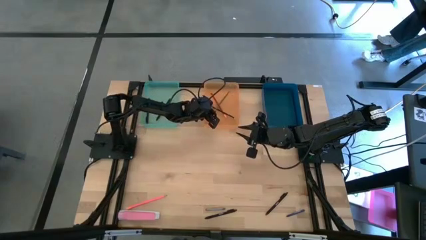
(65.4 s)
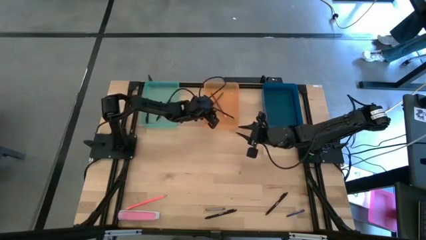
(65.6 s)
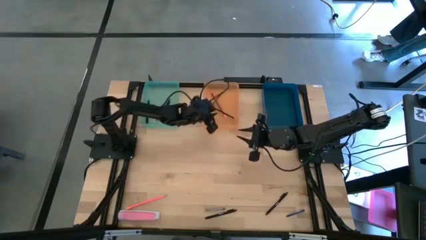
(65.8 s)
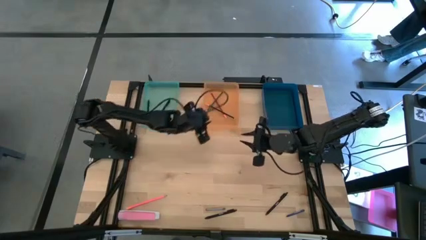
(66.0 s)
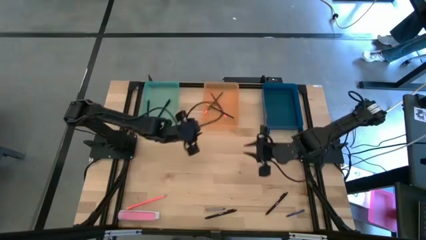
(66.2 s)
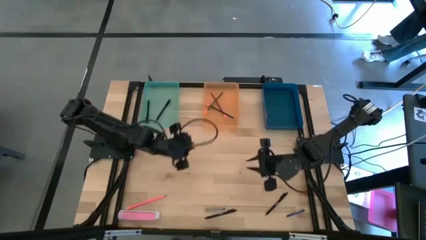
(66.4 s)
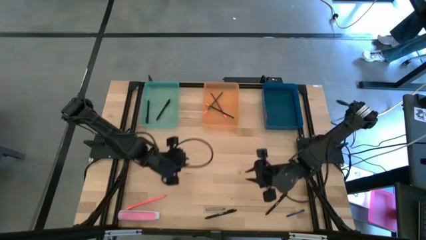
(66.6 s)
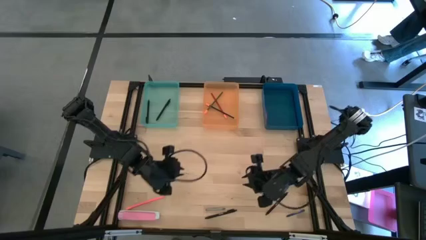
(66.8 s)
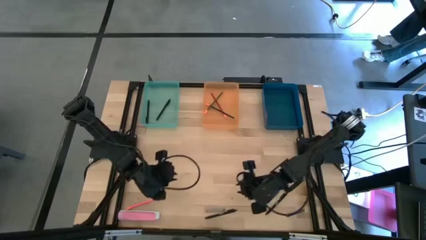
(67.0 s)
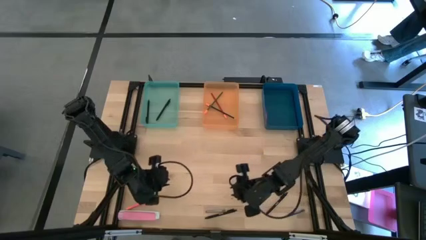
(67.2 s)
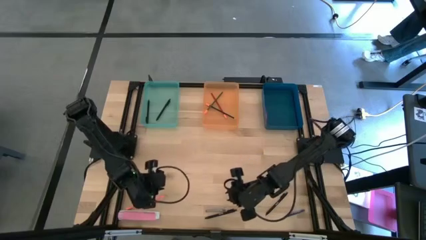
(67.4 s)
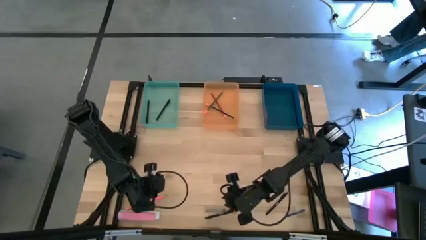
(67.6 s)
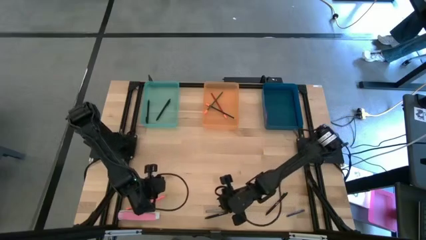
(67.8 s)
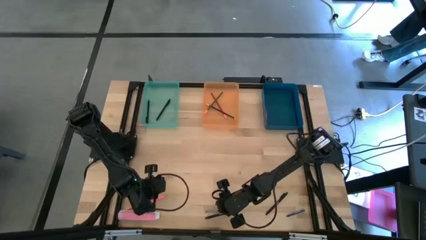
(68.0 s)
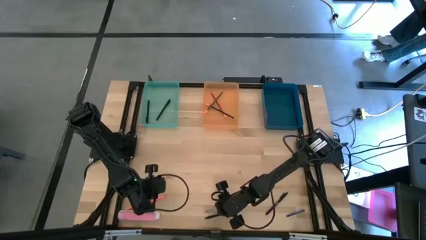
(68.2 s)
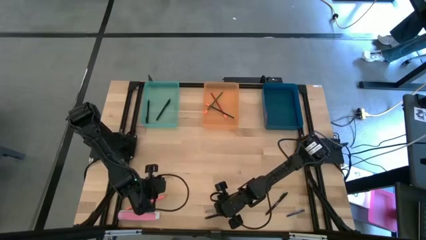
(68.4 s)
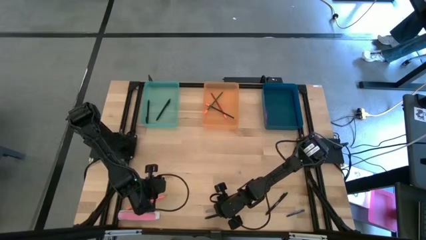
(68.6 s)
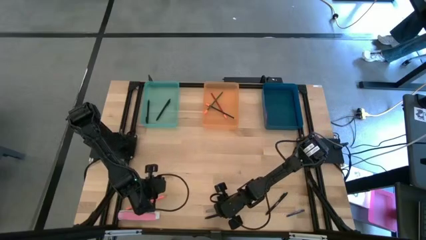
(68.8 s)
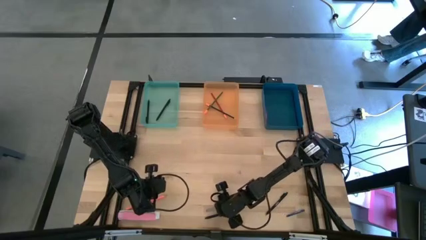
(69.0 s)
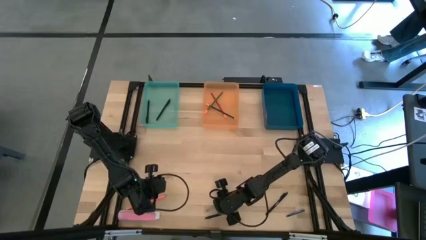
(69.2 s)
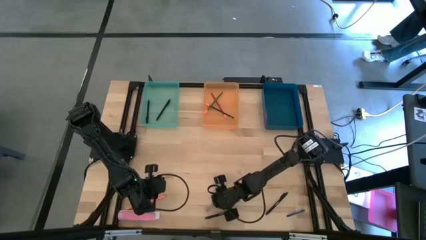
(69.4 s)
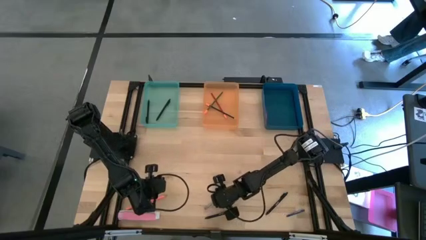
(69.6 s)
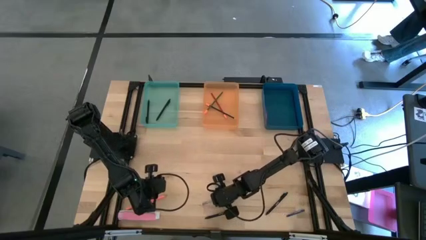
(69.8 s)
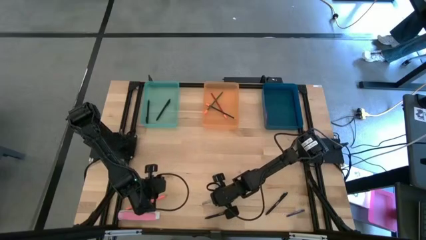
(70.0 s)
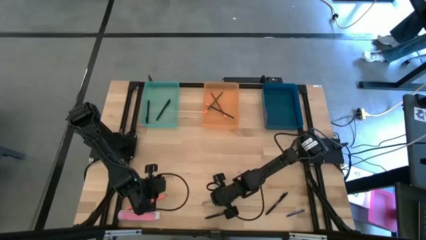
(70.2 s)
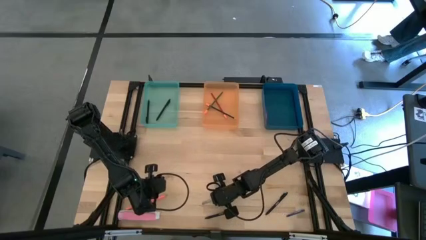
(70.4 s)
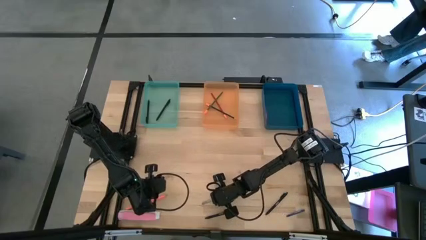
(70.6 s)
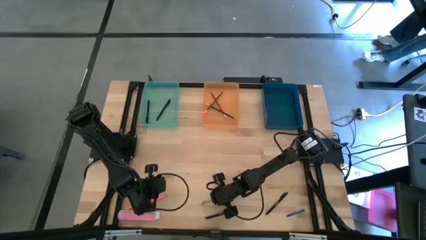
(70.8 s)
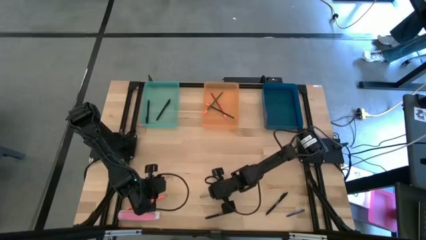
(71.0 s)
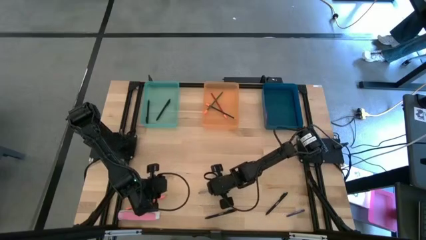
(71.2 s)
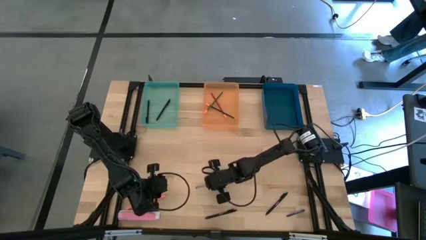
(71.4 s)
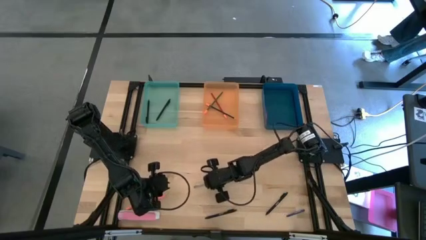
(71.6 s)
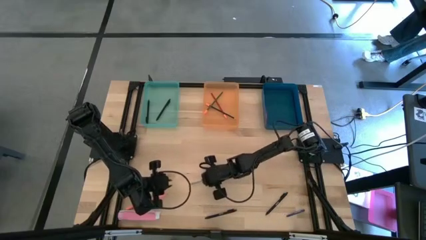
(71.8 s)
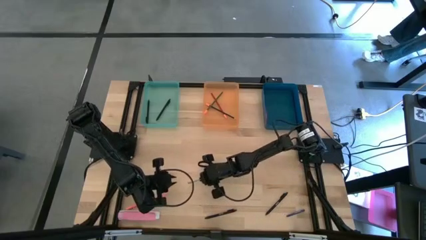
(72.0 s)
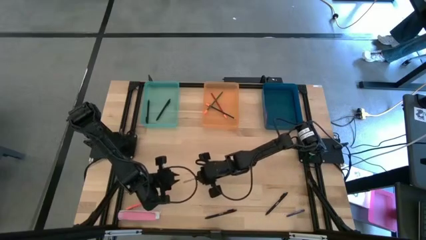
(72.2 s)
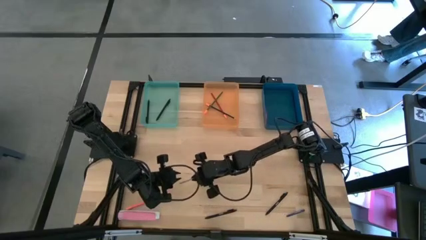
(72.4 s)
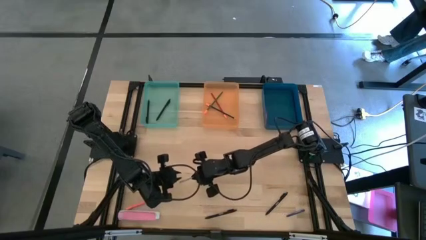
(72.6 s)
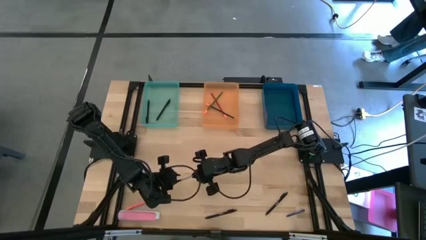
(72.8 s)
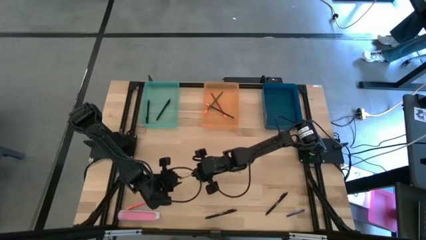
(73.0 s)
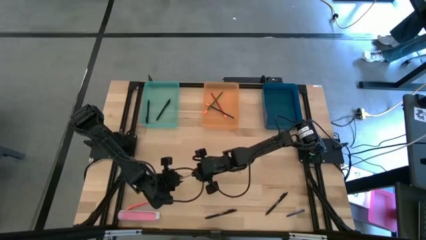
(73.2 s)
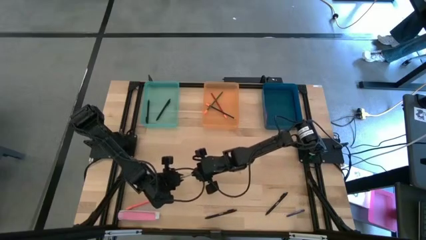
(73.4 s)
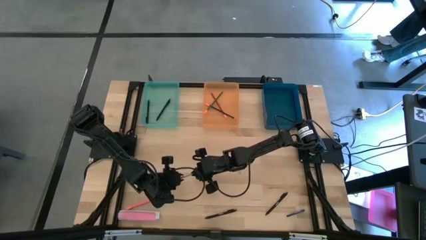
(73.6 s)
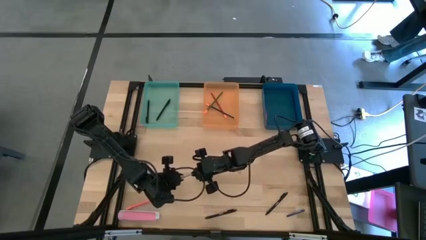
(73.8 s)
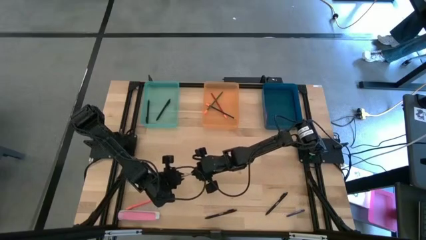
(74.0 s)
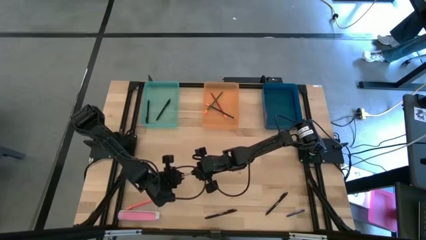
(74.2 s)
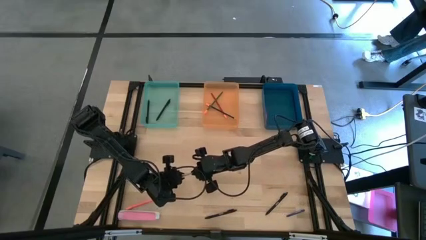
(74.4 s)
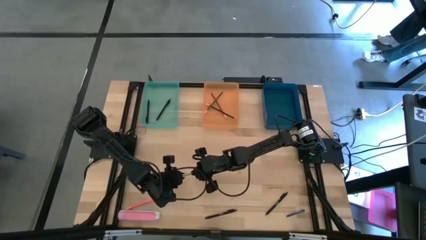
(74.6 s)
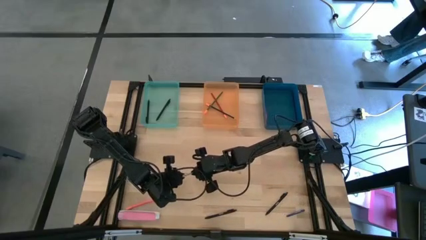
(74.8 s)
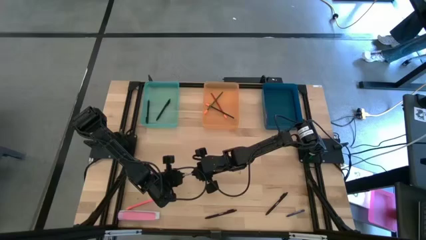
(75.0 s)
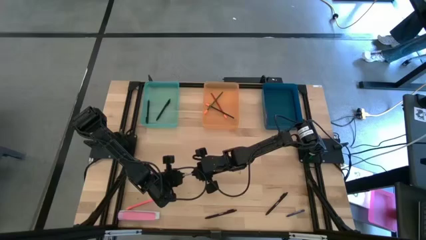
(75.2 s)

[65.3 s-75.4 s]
Task: Sort crayons/erasers/pens/pencils in bins
Put the gray crayon into the blue bin

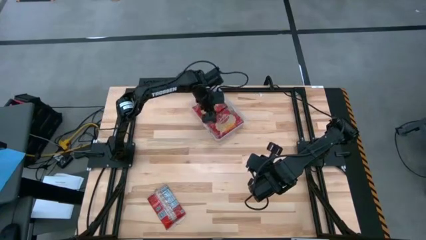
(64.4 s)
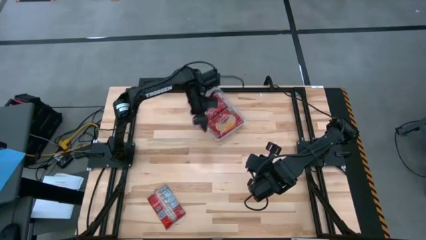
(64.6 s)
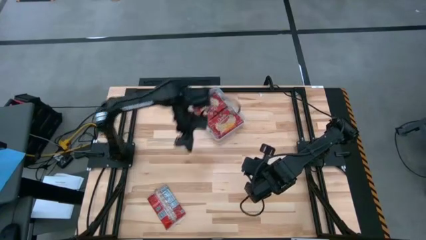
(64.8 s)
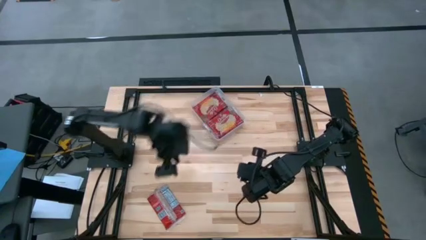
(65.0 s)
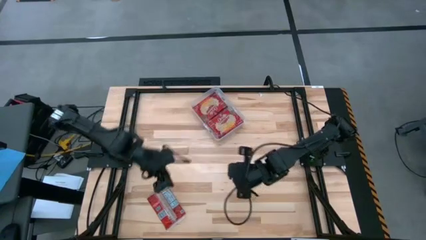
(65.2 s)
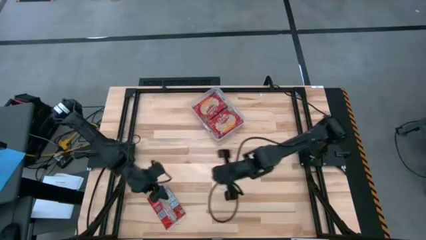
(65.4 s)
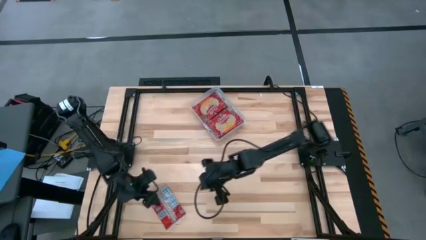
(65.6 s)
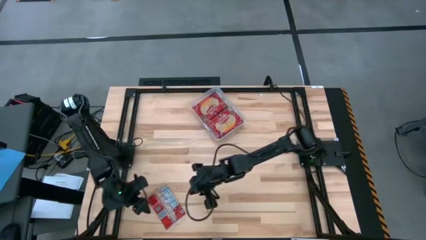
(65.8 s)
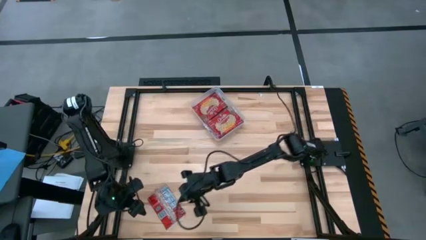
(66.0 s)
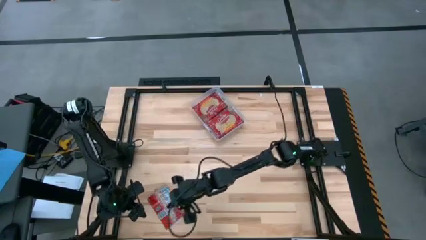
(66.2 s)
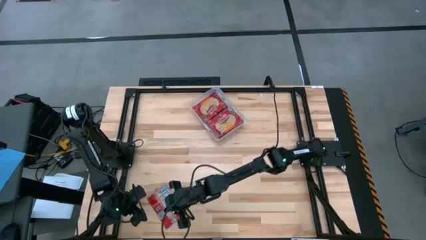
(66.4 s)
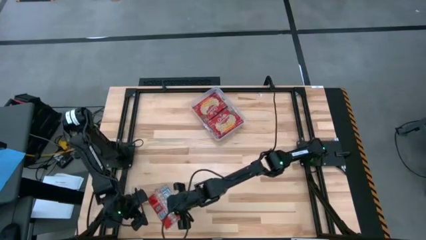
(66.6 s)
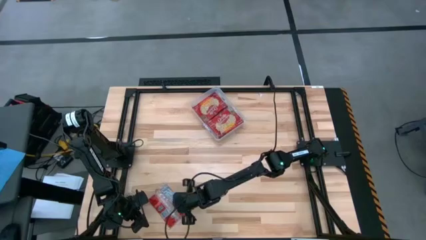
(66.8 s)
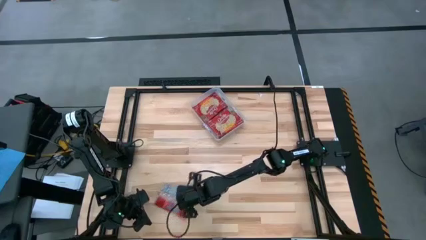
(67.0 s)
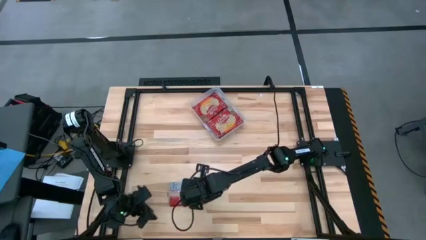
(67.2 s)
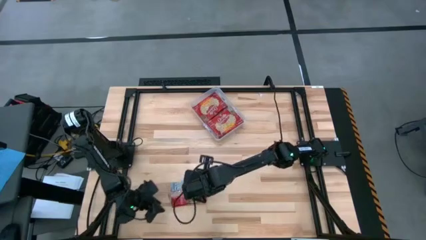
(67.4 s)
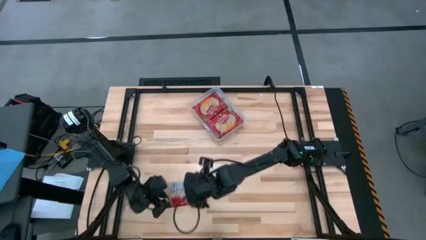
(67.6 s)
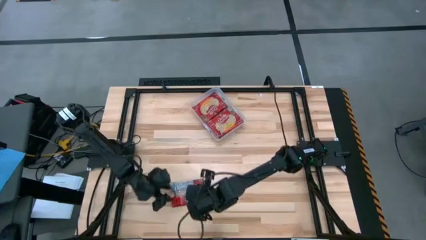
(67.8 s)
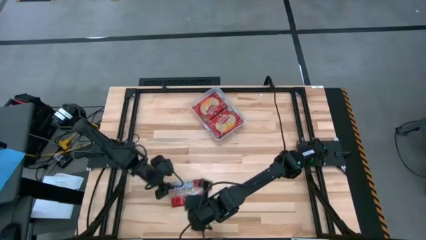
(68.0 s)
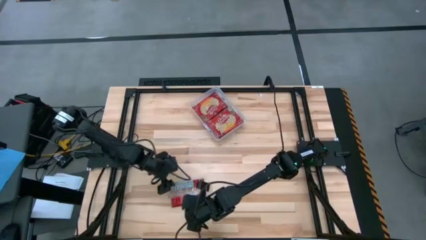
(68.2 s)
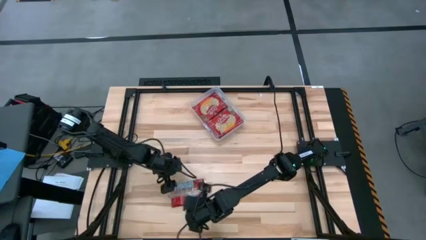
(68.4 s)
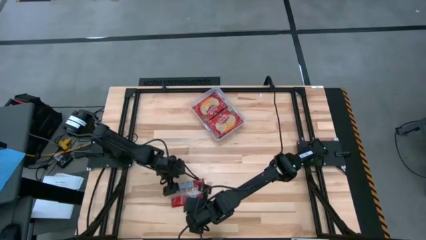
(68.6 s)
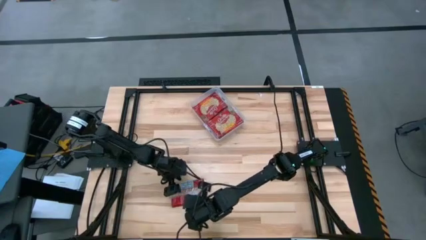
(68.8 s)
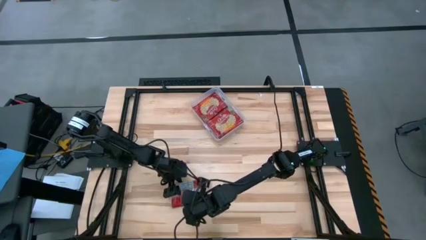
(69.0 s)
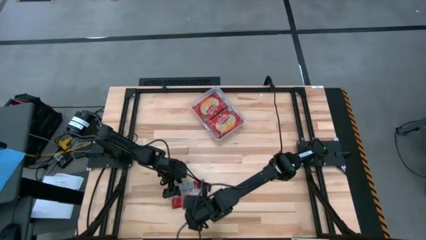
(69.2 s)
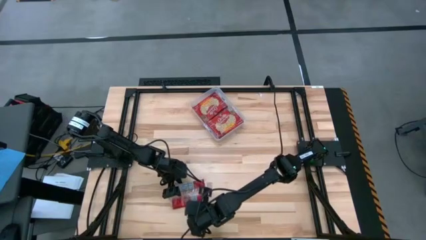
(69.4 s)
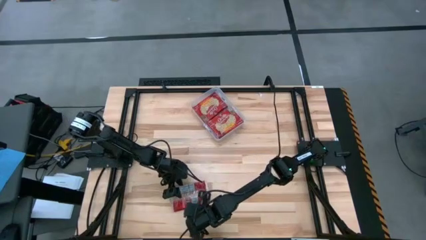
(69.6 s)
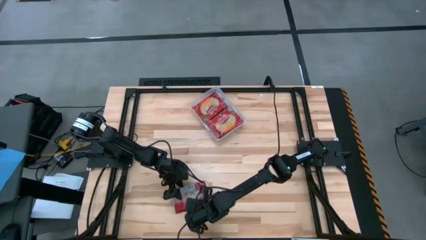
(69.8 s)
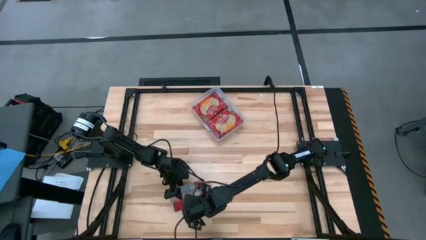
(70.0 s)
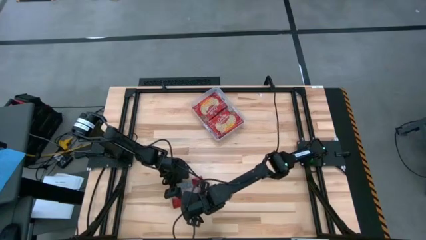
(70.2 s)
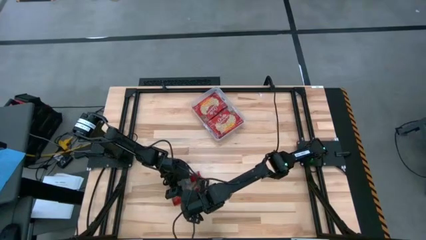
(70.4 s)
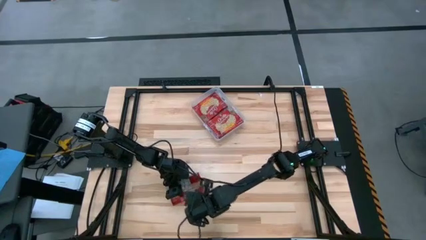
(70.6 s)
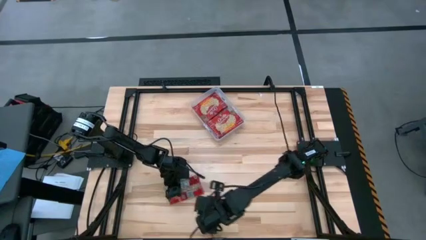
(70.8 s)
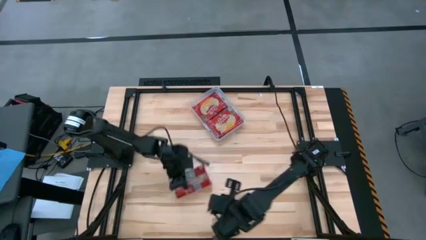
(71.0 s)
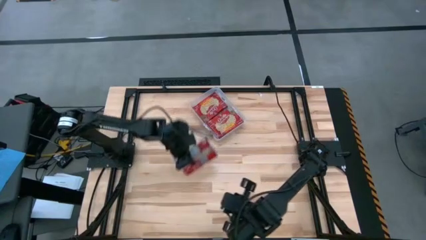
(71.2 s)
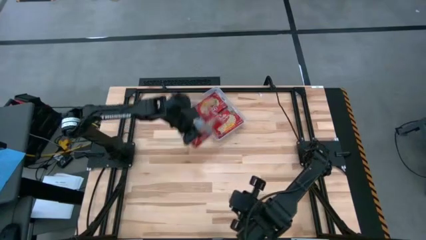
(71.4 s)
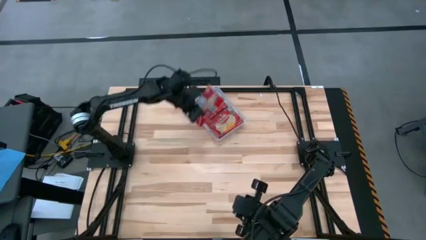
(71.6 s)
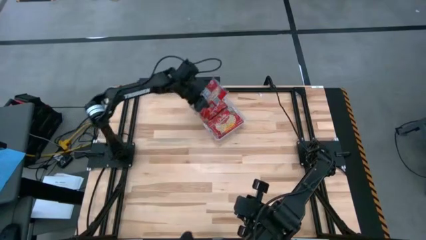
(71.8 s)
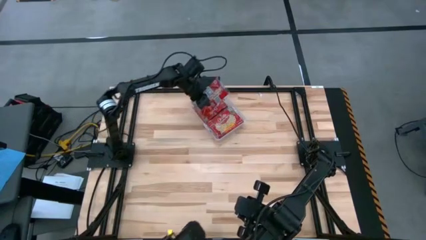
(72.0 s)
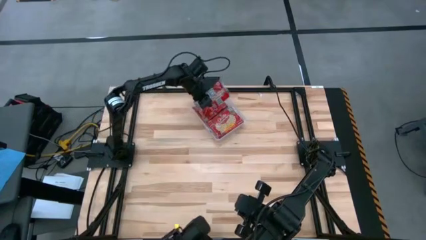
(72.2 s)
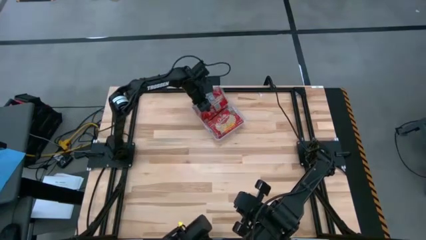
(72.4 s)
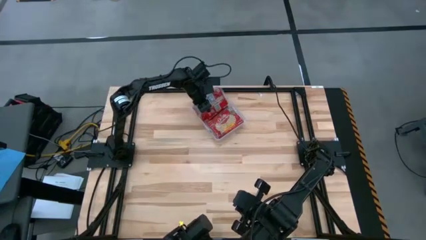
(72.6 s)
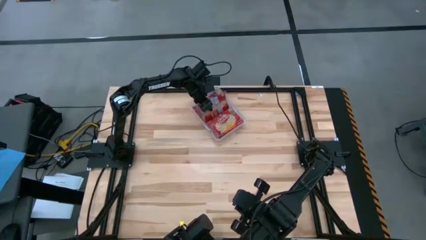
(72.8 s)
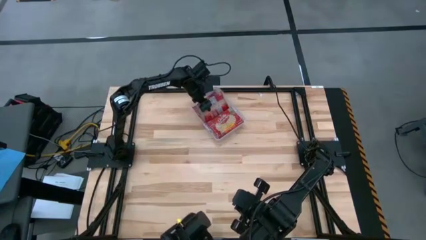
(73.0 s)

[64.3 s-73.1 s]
Task: Sort popcorn bags into baskets
Put the red popcorn bag into the white bin
